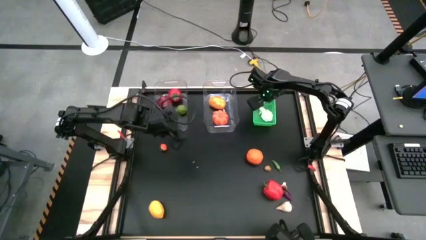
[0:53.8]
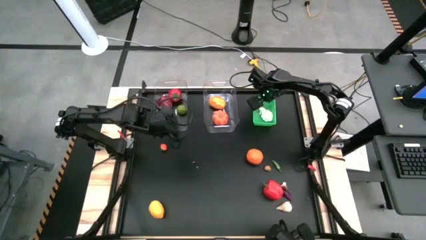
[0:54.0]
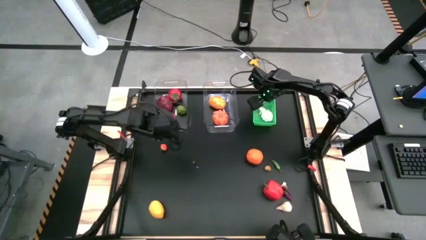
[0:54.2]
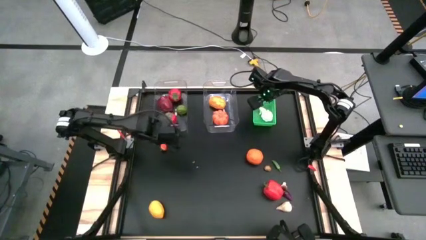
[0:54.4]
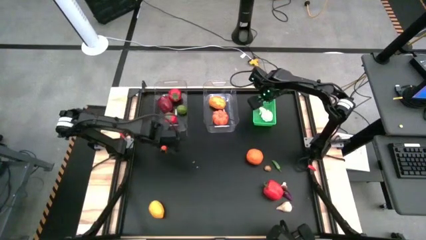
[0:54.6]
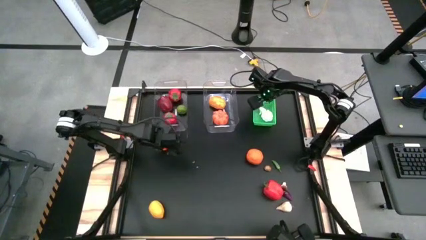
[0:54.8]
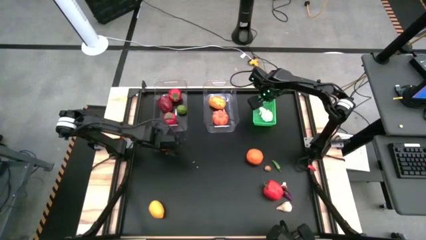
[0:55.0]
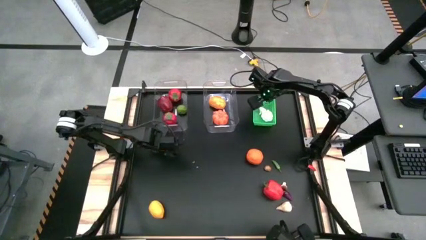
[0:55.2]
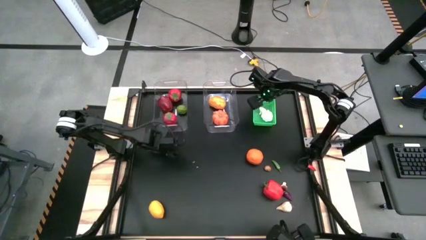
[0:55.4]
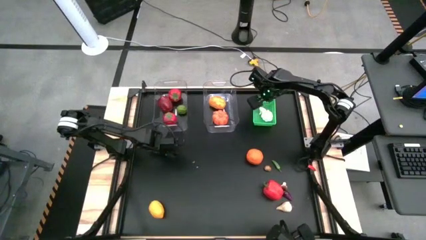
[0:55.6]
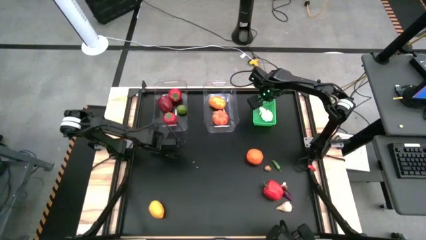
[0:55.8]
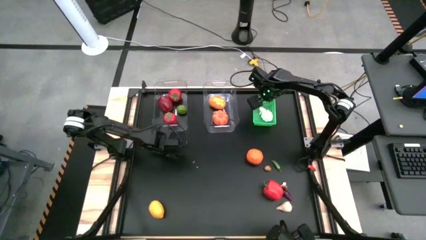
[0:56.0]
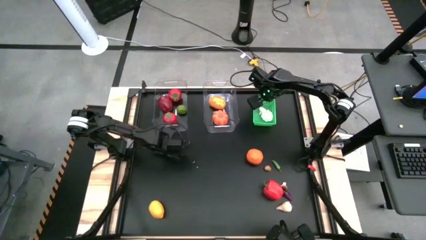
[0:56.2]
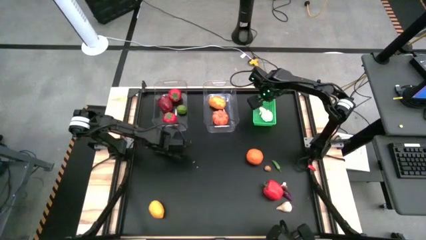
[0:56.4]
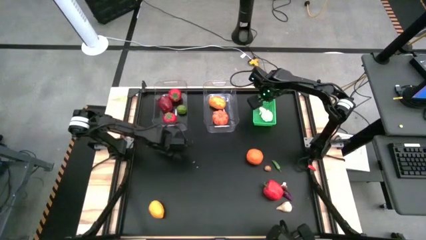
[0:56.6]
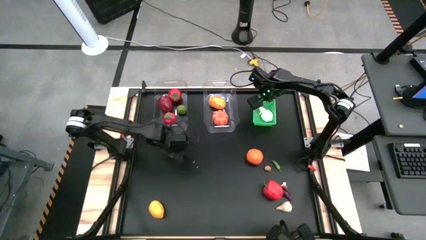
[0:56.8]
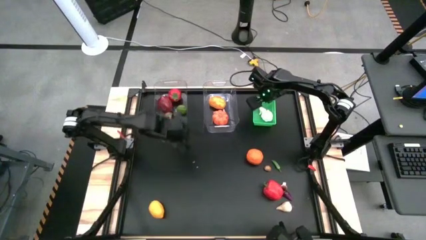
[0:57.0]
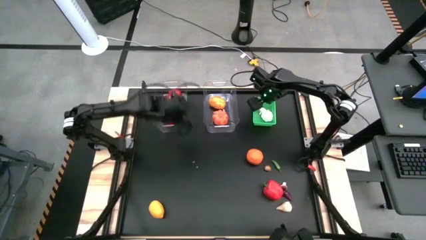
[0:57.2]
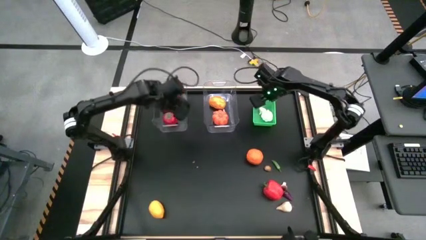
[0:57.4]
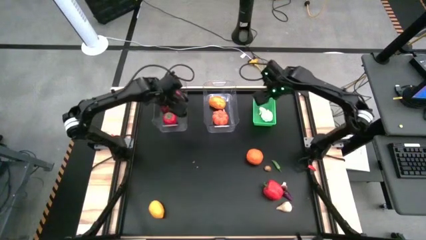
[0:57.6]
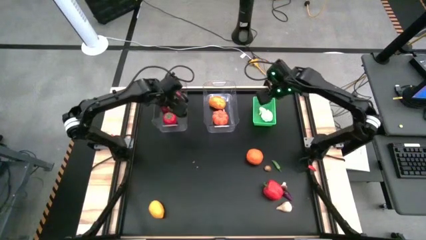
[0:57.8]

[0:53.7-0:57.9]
Task: Sort produce into baskets
Put the tomato into the left transparent bin

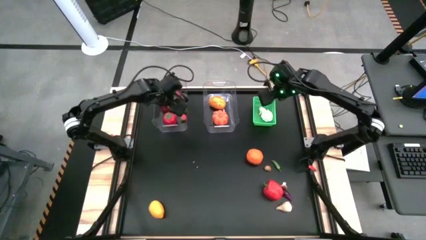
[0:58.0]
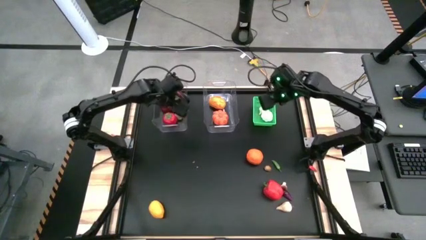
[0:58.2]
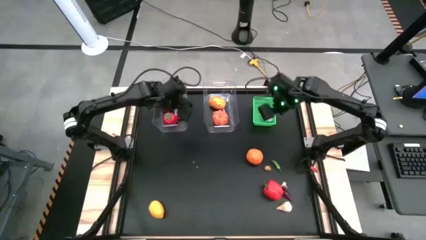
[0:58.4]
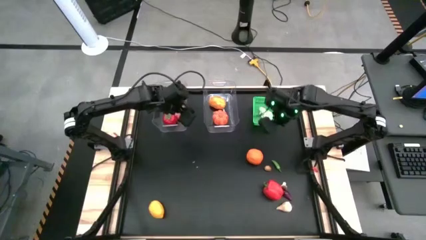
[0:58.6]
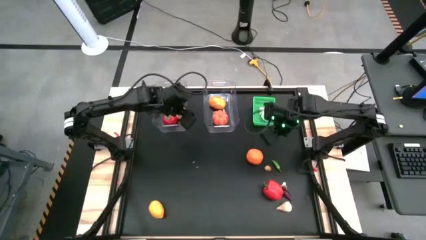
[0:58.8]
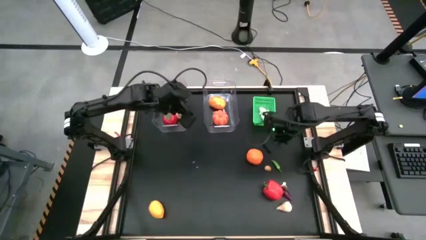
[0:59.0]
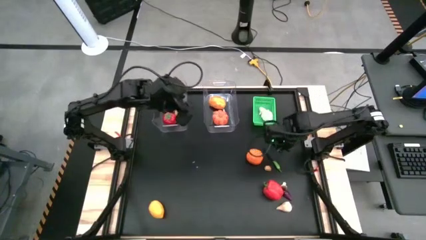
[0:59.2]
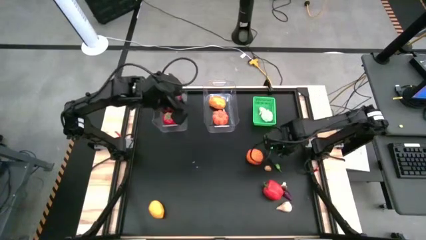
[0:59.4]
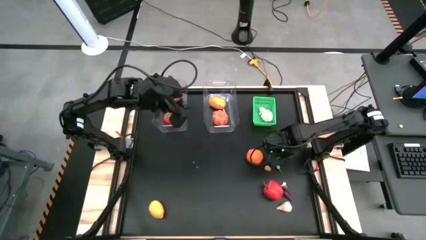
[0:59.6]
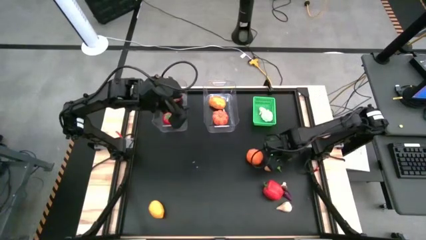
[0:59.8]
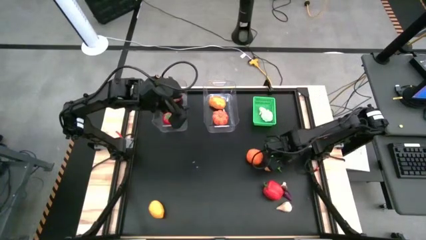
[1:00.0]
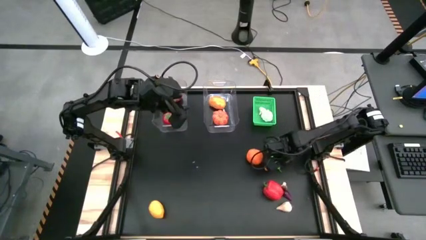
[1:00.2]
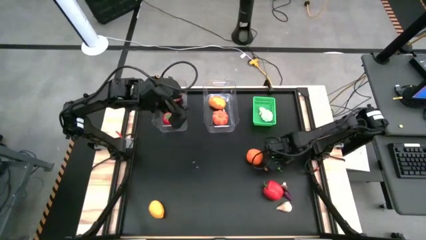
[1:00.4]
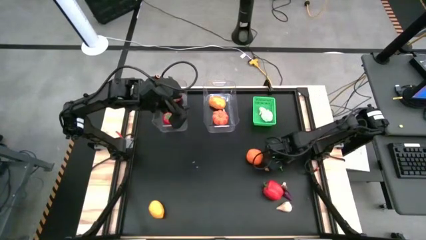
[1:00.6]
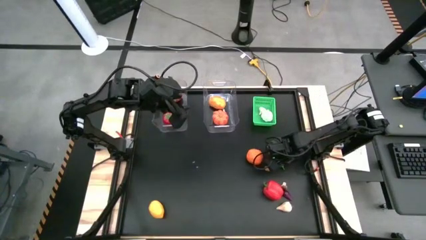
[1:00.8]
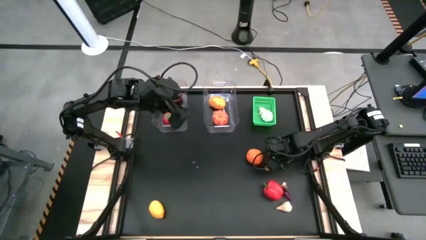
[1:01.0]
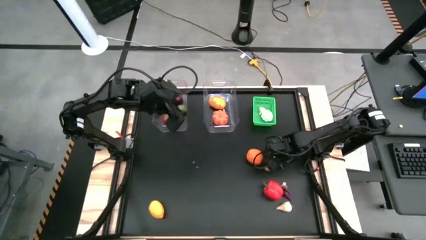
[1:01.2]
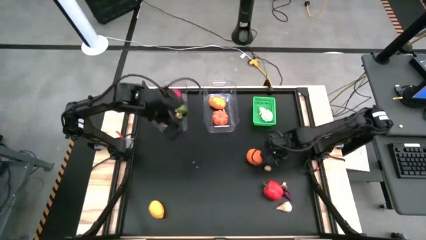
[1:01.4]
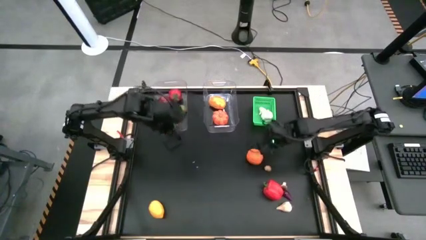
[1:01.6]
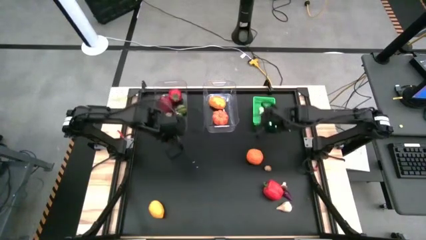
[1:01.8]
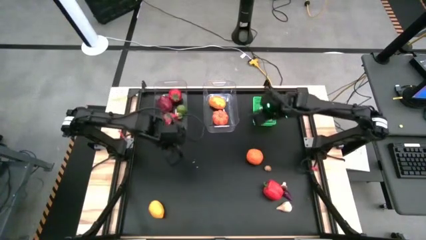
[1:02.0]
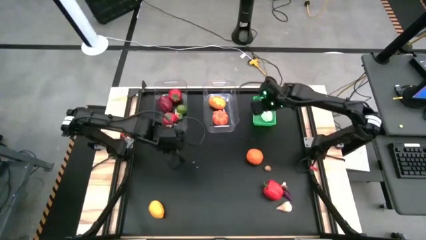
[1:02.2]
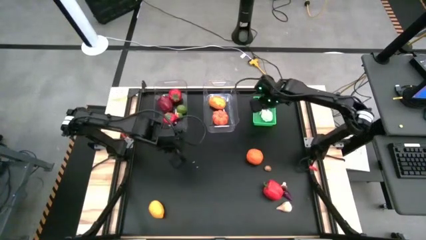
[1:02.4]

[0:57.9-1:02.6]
Put the green chili pepper into the green bin

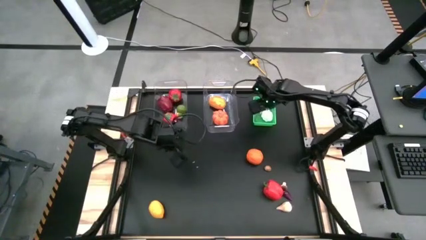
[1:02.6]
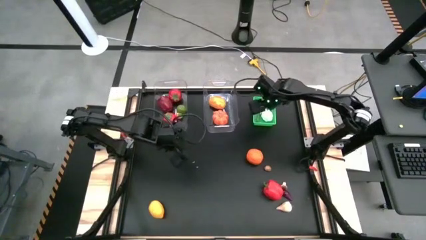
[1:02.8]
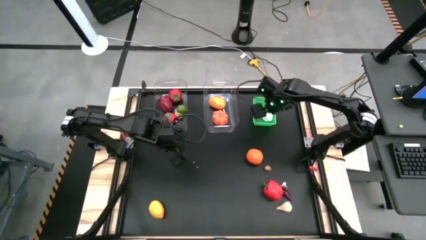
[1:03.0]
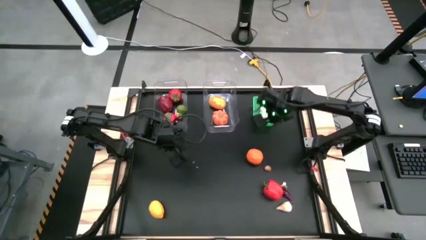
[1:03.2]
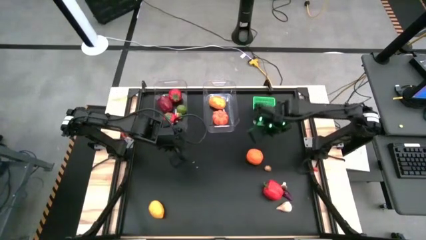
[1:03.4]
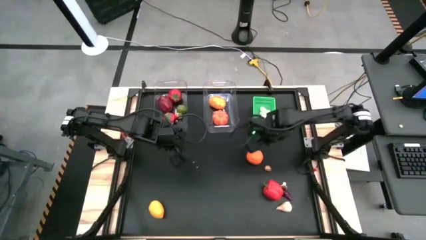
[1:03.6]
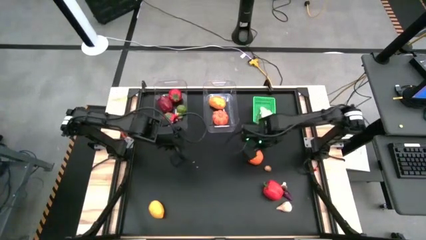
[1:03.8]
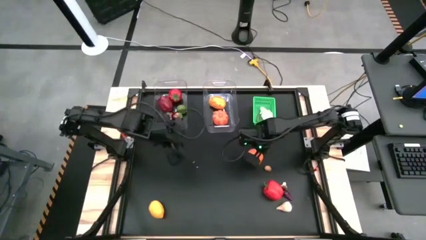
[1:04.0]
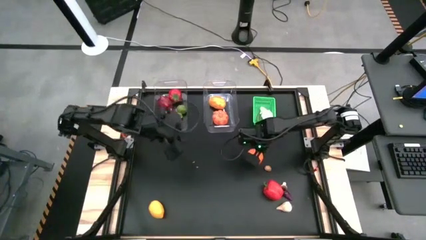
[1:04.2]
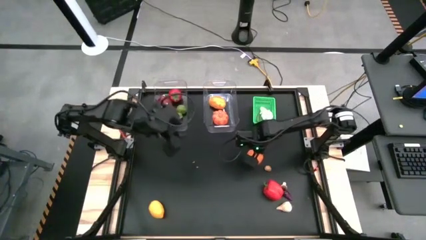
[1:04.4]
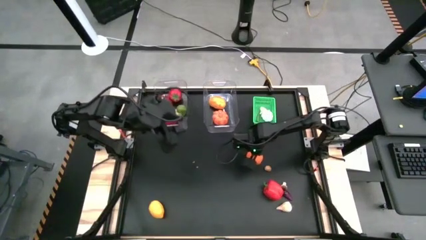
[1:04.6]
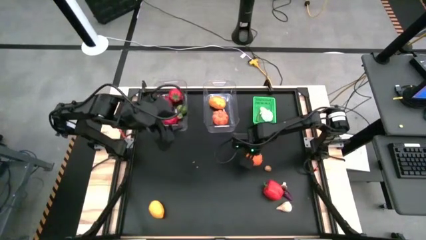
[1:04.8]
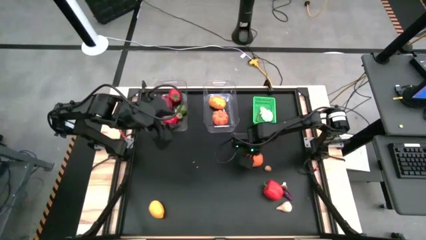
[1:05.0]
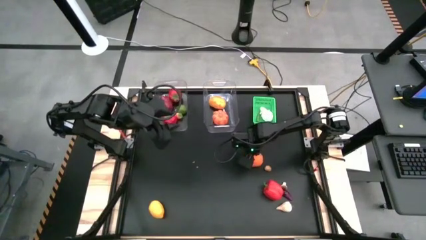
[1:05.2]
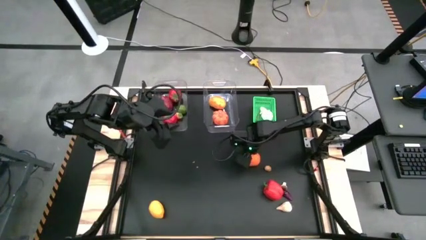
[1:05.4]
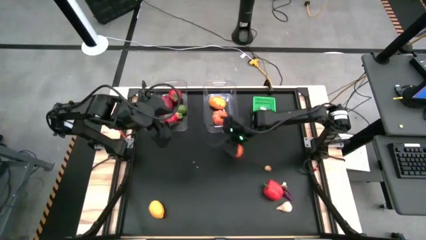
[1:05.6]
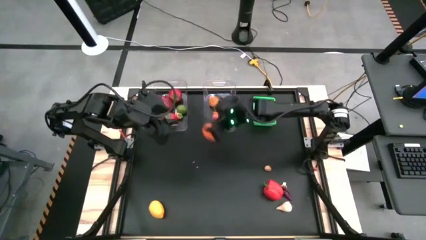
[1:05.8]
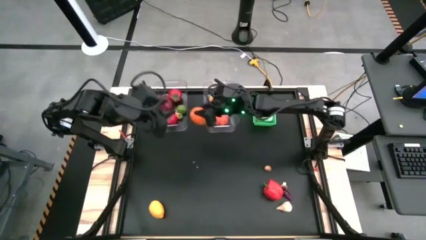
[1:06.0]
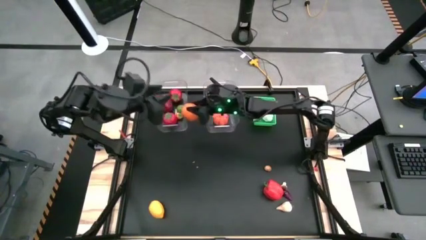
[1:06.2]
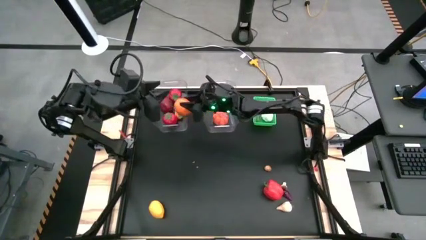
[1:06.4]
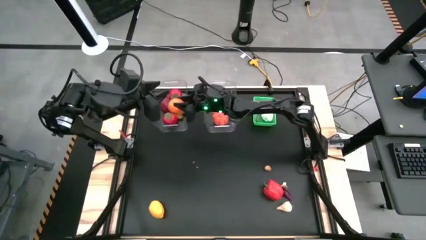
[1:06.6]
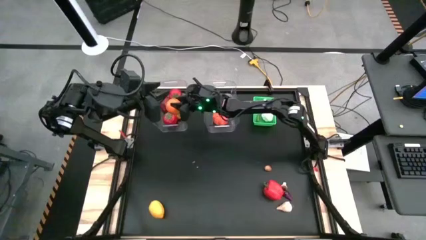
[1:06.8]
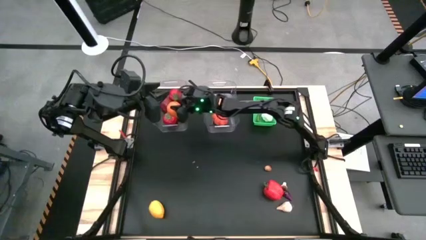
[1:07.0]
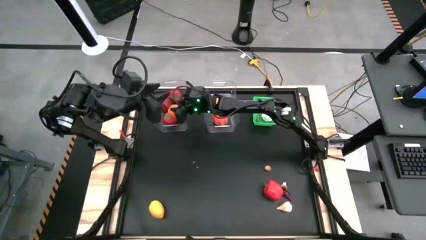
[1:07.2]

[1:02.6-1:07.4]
Put the orange into the left transparent bin

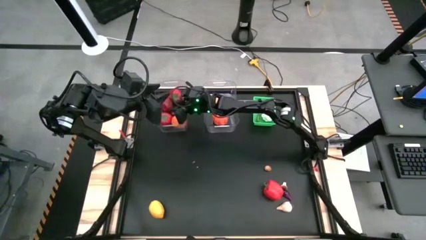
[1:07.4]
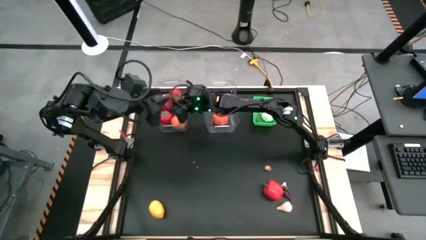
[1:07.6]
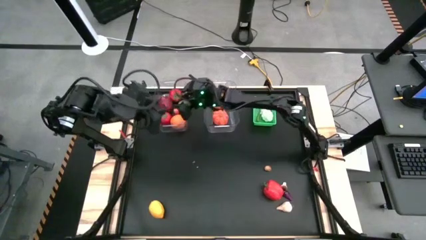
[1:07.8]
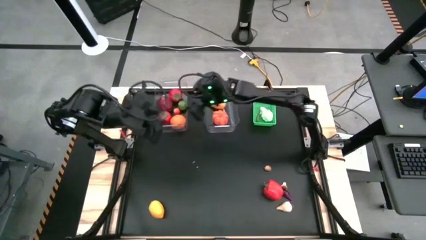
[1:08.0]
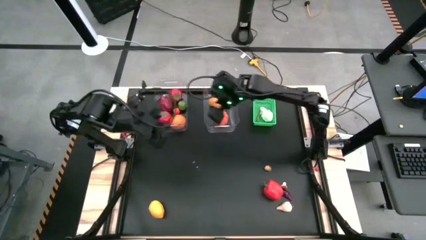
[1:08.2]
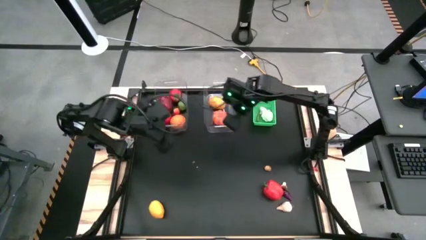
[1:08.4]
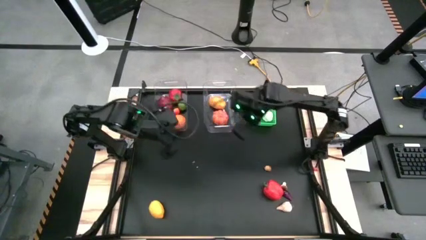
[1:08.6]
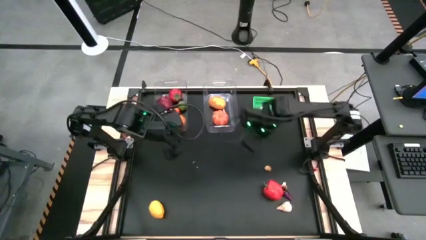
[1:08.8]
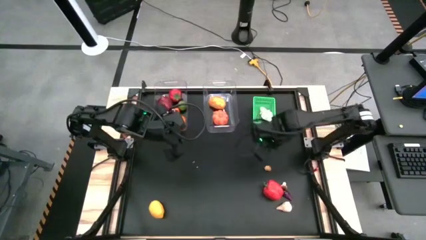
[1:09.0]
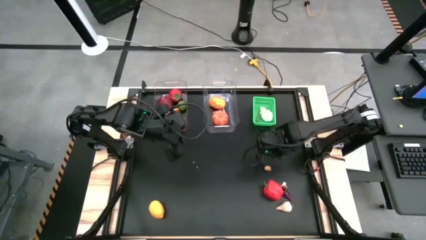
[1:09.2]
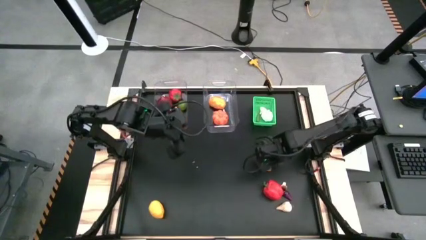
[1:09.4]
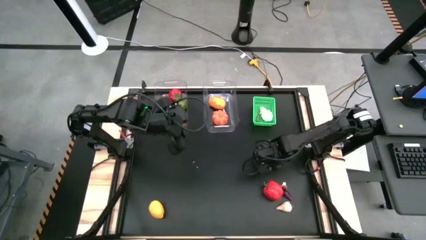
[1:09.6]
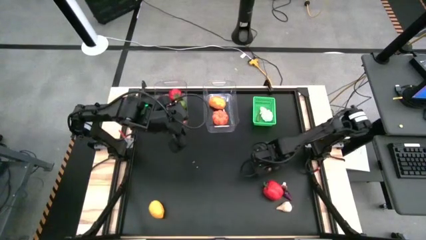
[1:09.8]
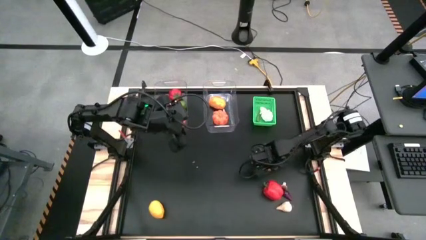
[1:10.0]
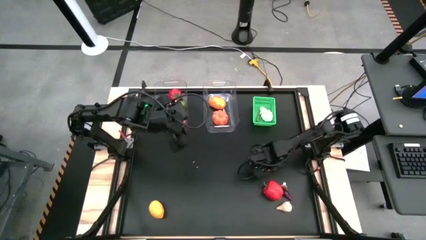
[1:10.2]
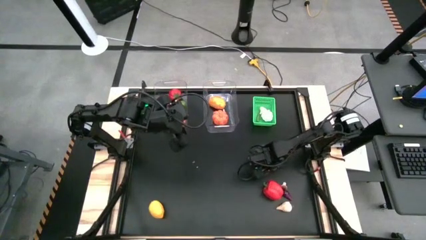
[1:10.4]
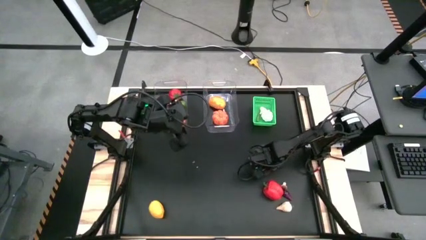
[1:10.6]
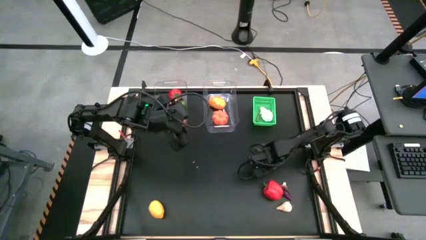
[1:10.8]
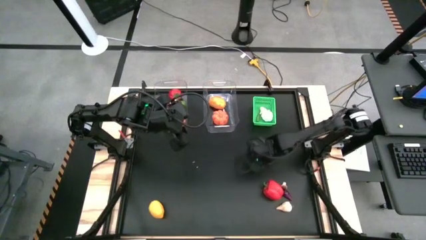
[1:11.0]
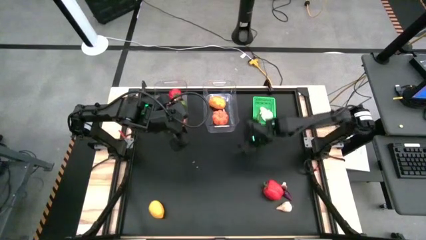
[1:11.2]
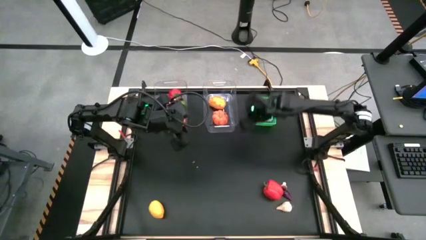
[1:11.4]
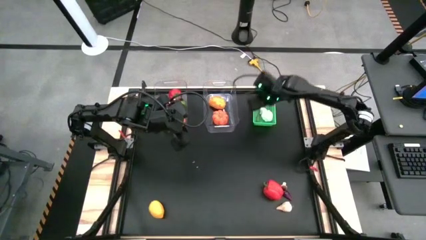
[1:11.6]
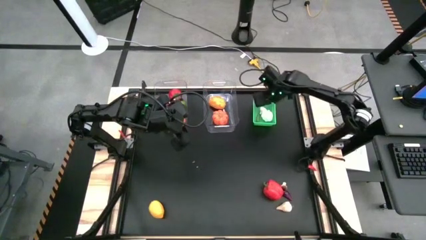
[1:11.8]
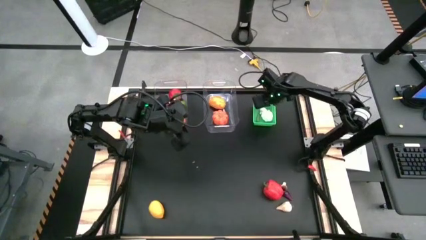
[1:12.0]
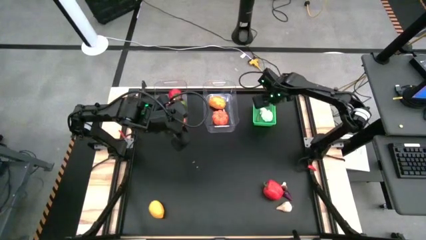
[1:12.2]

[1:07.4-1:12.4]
Put the ginger into the green bin
